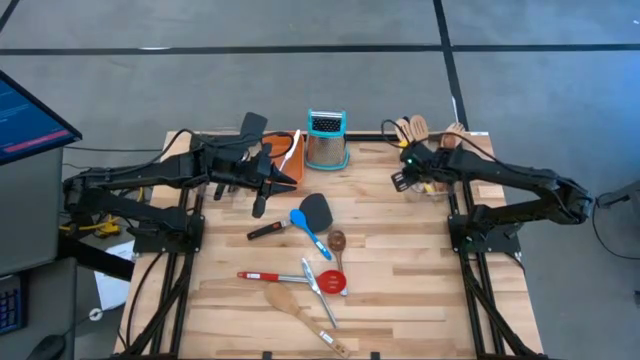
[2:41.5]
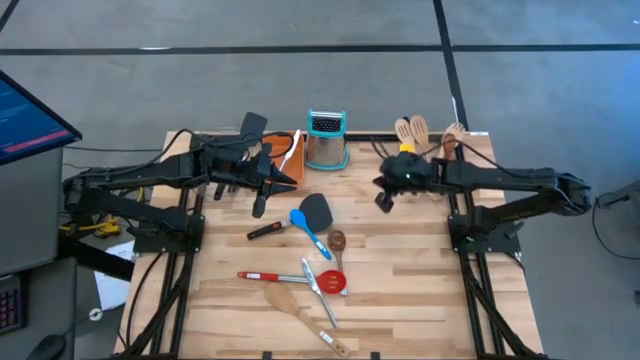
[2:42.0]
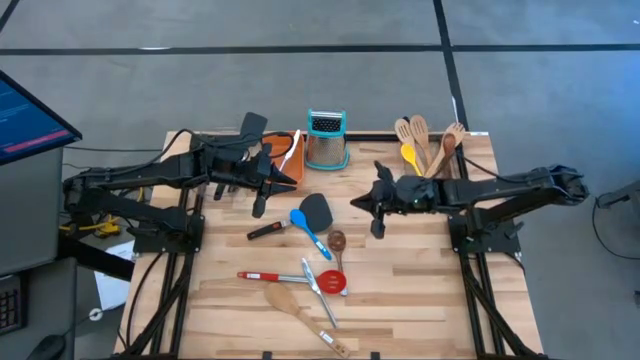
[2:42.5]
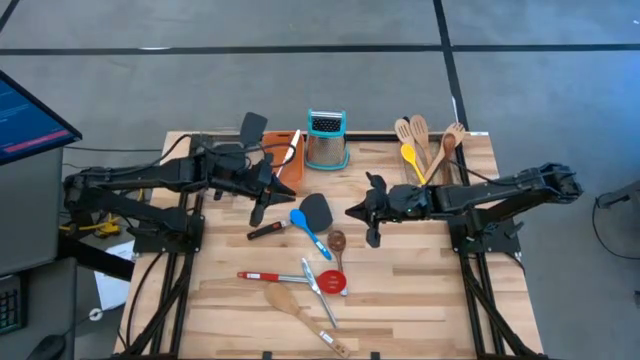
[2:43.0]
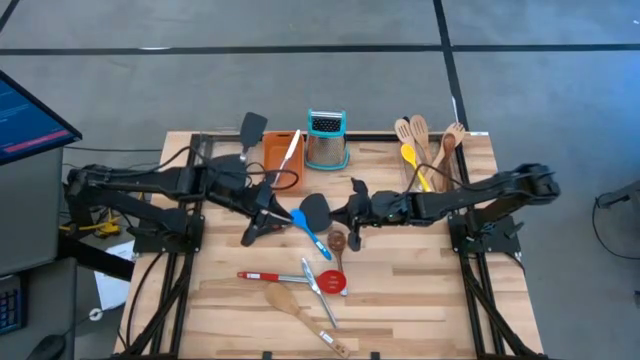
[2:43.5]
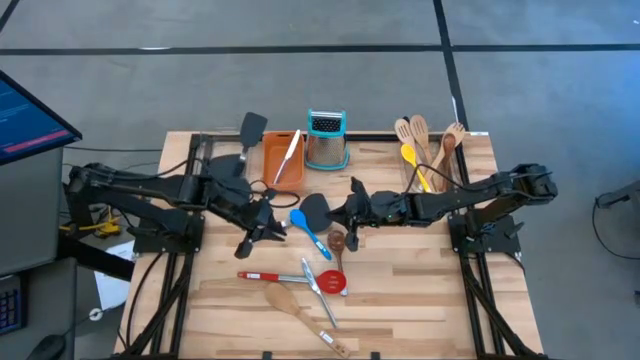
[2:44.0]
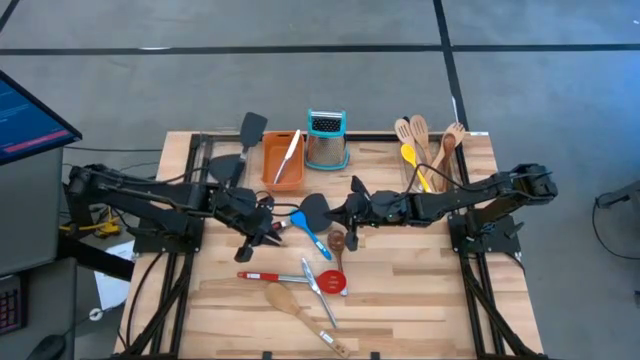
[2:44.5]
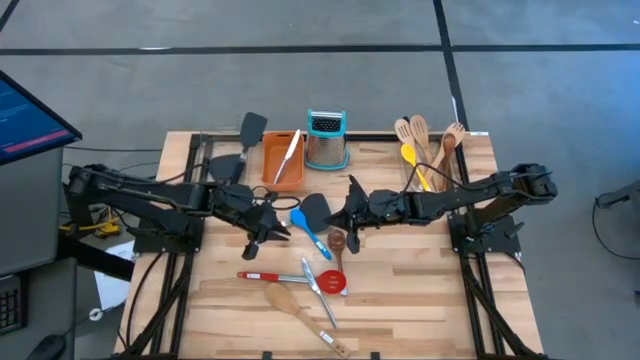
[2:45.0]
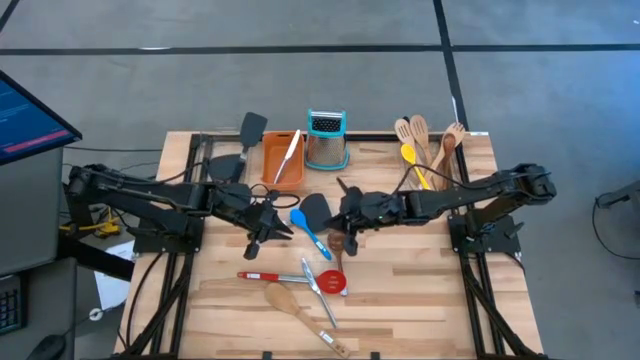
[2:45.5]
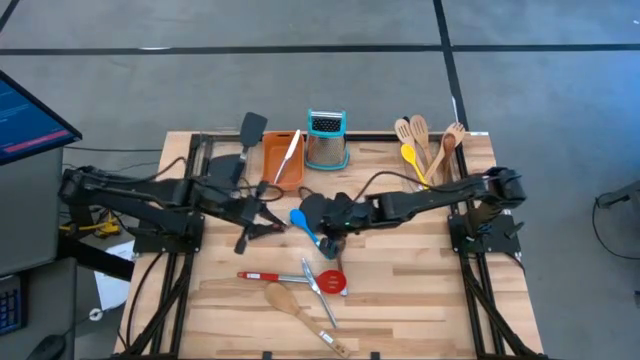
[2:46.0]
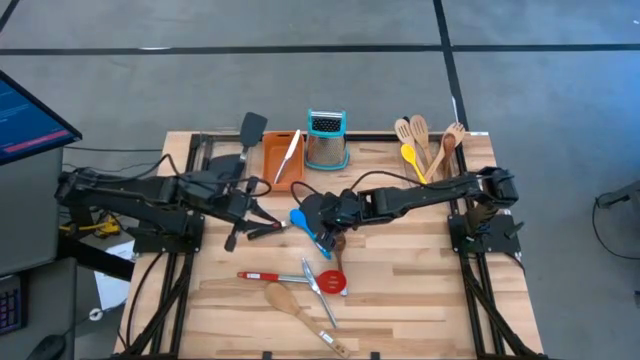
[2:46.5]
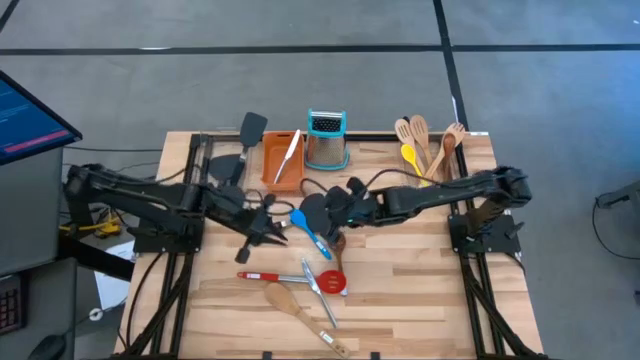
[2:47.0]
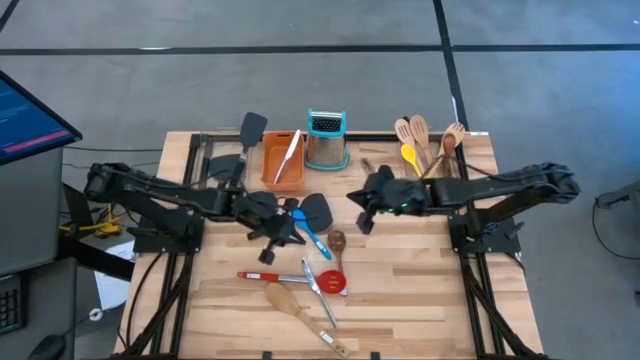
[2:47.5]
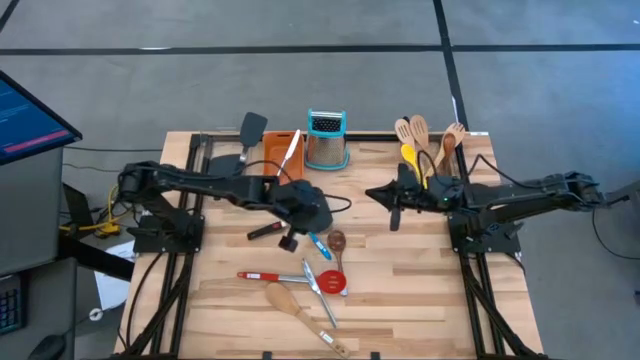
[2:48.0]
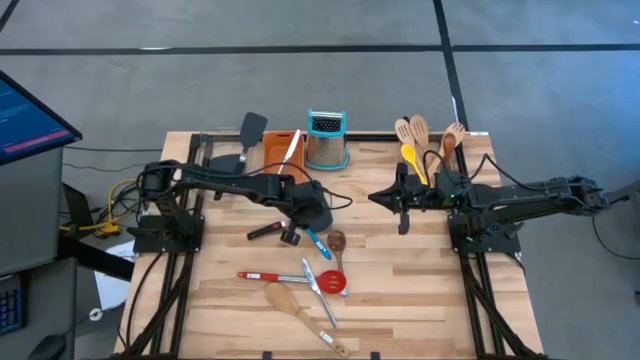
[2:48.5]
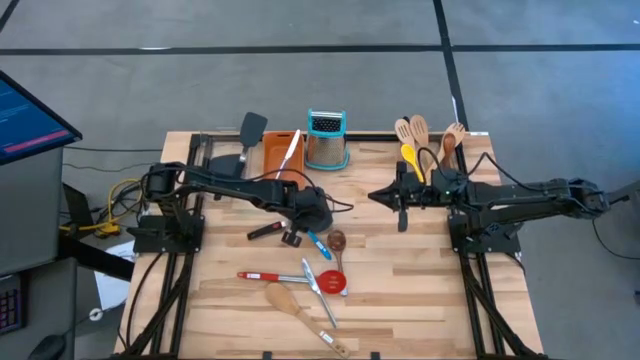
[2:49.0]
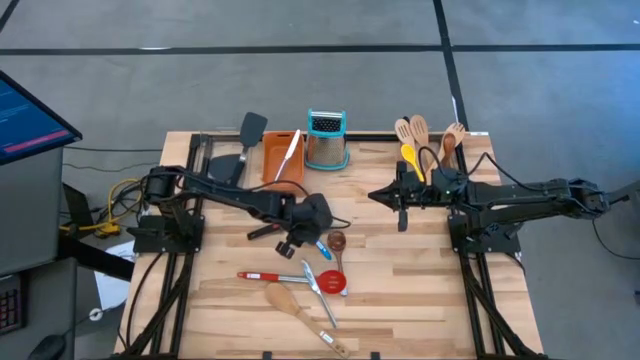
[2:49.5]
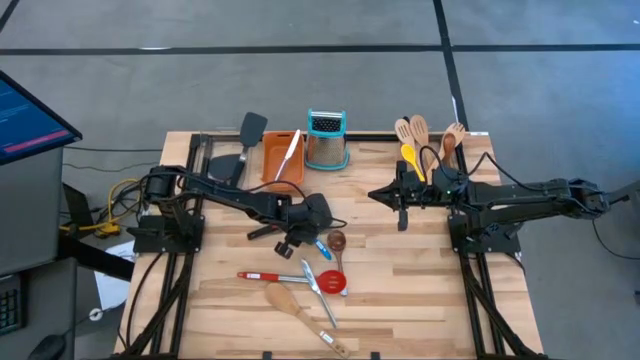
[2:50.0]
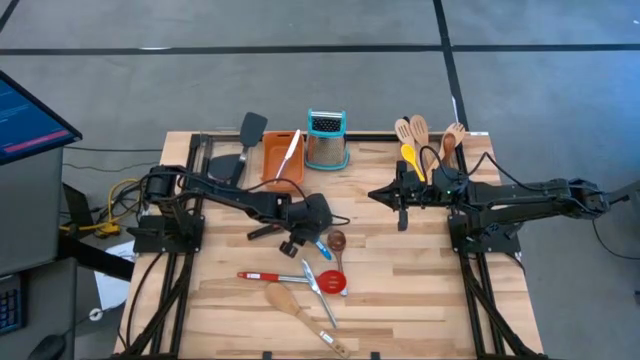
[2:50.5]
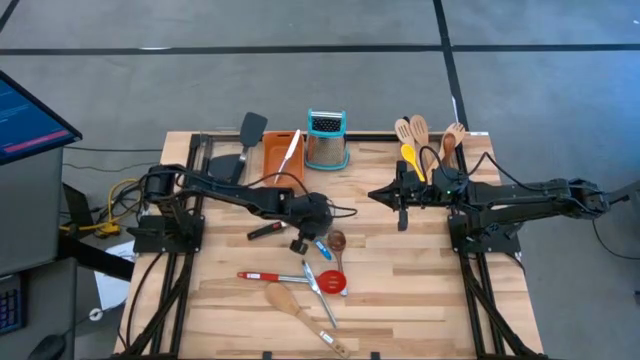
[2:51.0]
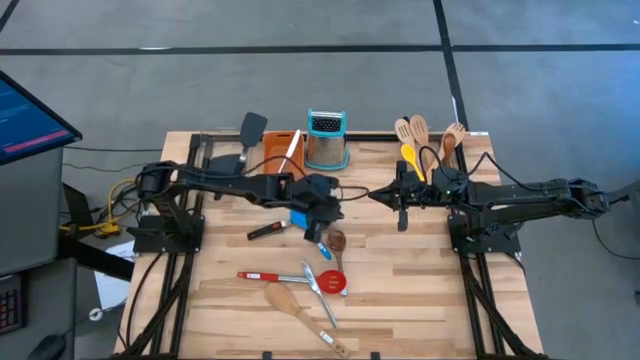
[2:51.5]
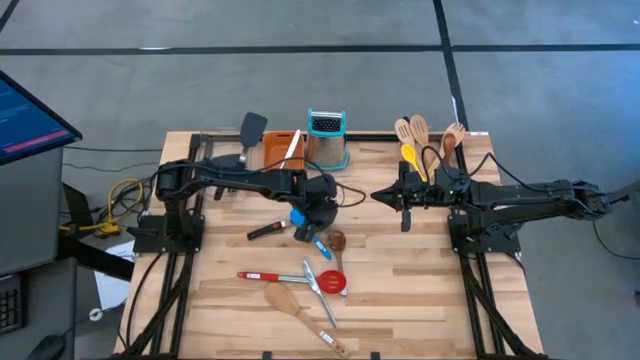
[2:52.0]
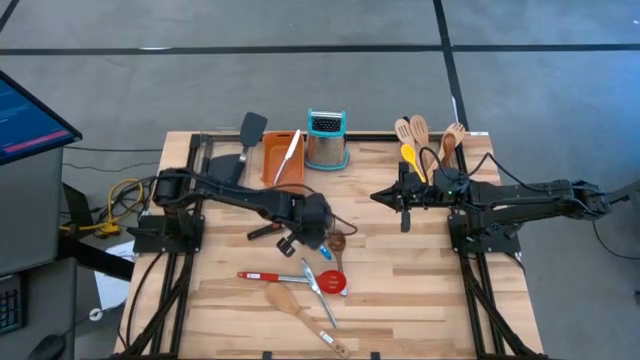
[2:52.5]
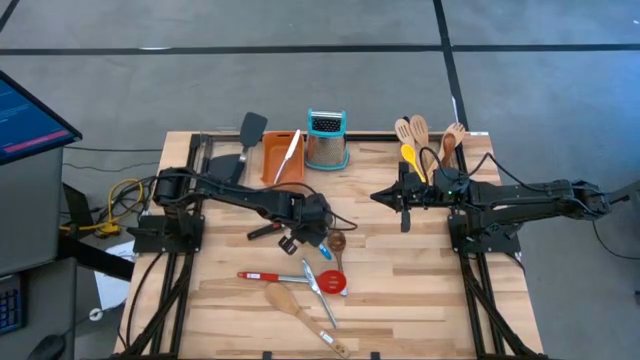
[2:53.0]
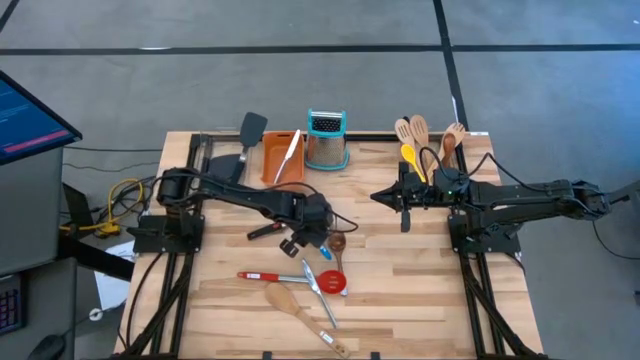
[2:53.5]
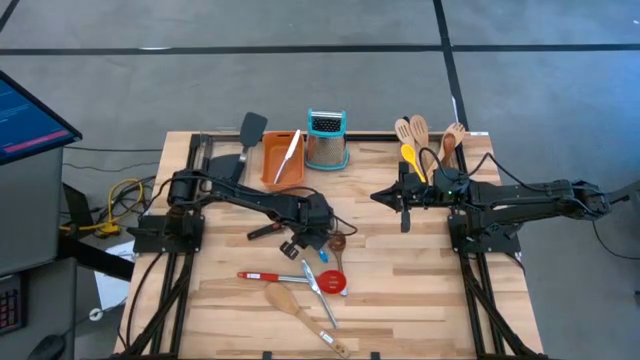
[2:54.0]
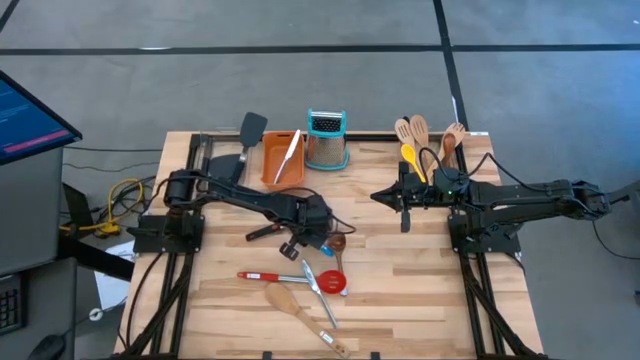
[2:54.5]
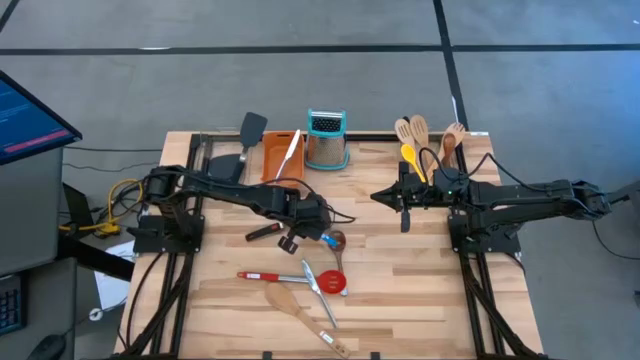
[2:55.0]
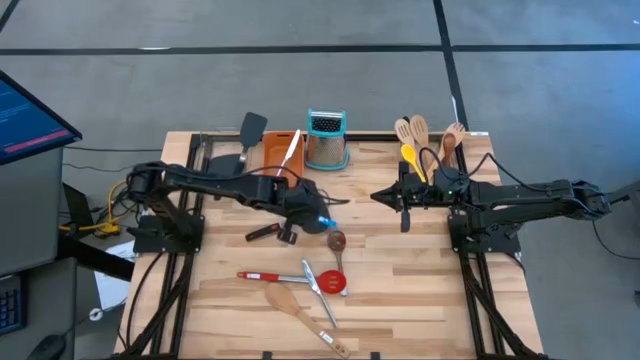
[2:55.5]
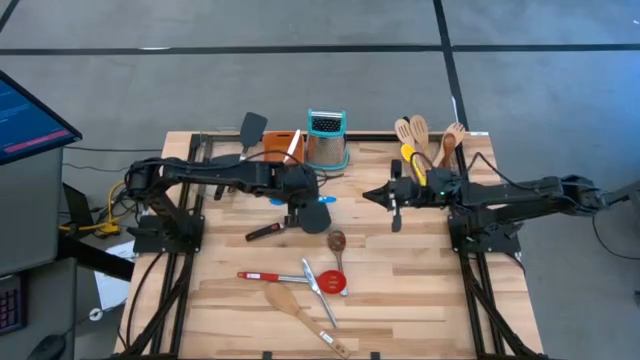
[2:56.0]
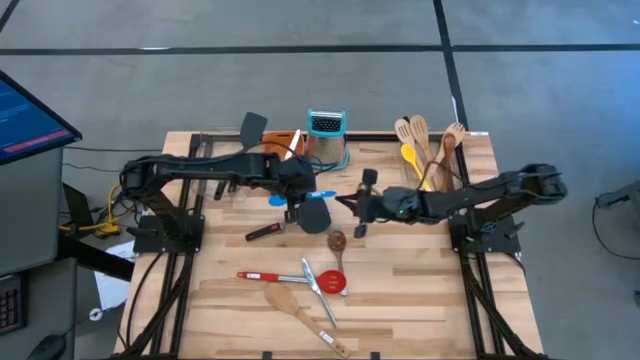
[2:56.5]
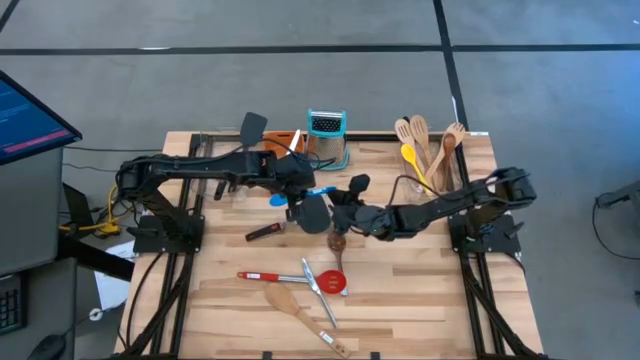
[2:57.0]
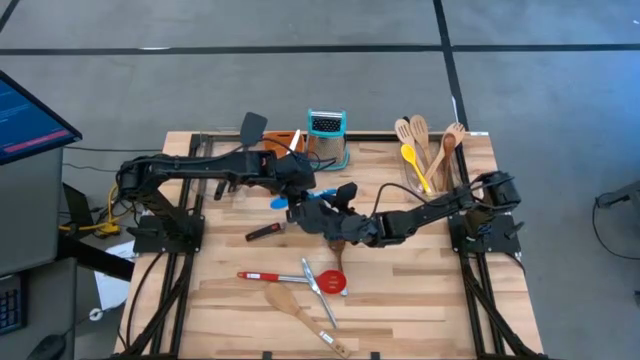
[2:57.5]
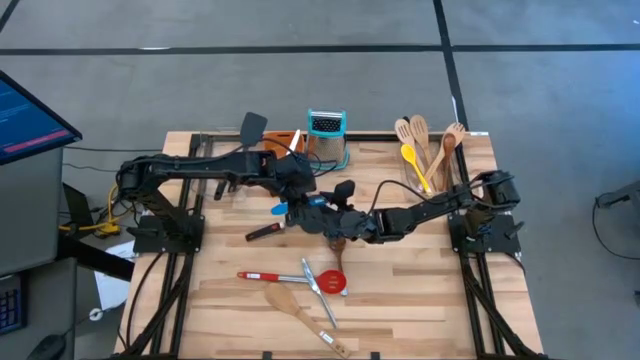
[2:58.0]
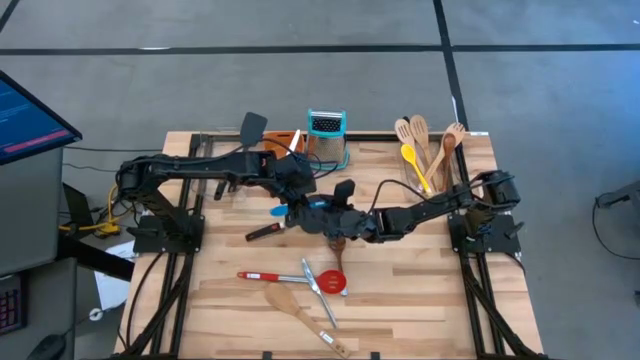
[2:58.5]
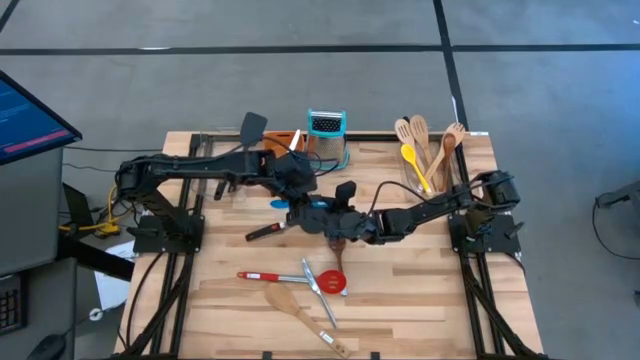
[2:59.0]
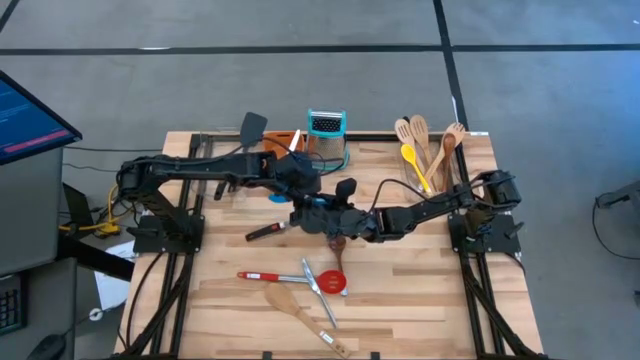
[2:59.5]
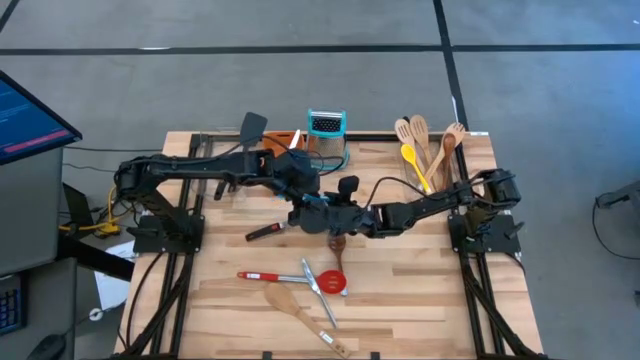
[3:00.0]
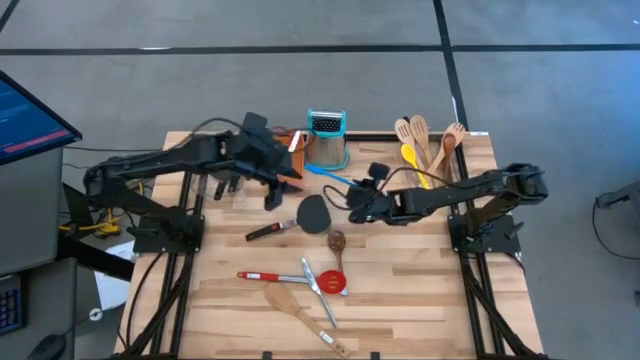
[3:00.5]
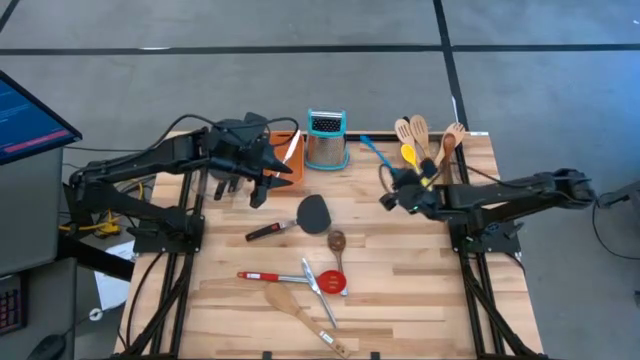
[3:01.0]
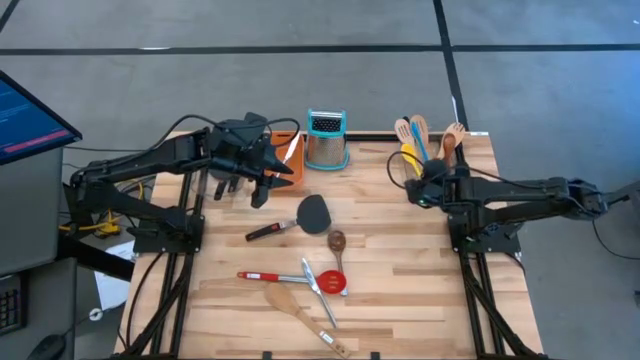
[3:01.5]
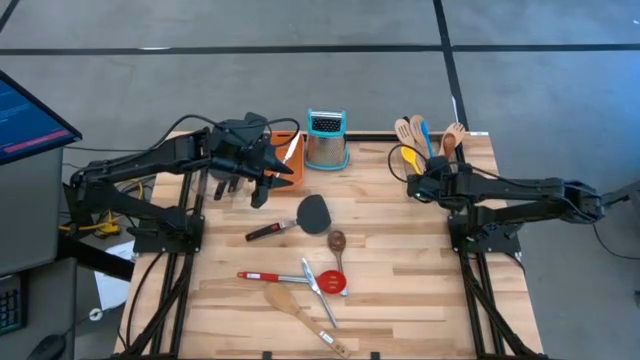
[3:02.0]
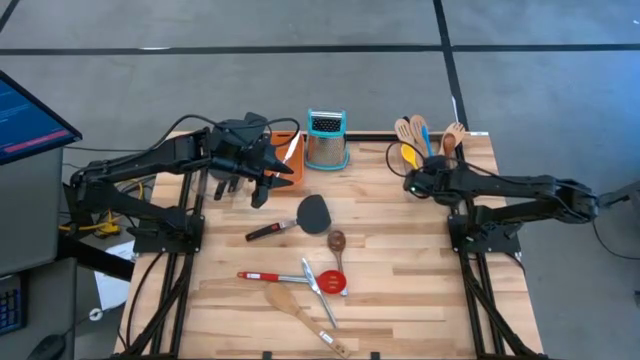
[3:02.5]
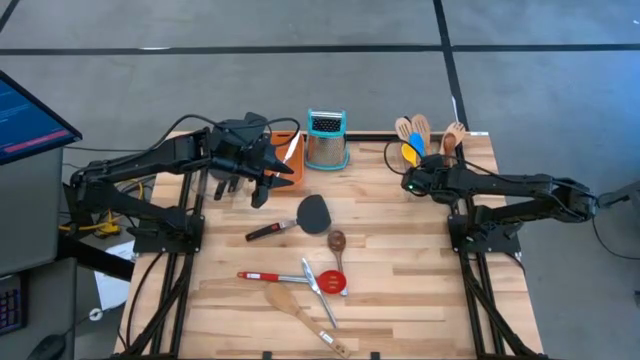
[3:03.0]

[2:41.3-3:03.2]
Task: Pick & Place Kitchen Items
Put the blue spoon into the right transparent bin
